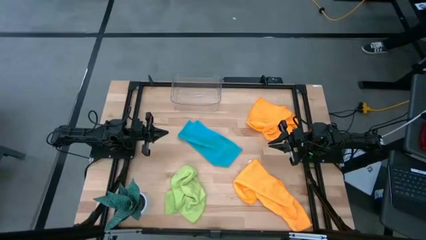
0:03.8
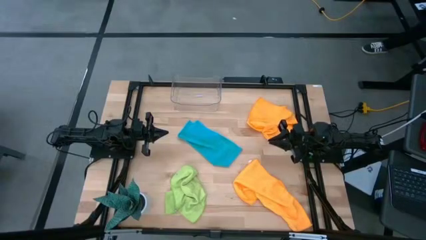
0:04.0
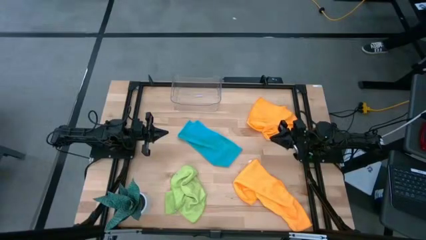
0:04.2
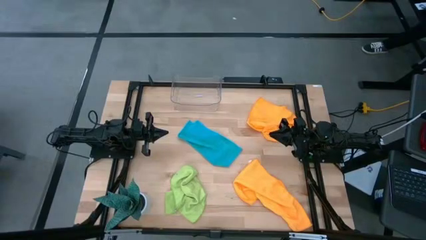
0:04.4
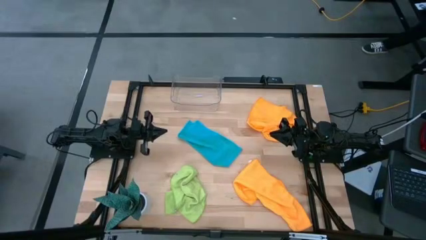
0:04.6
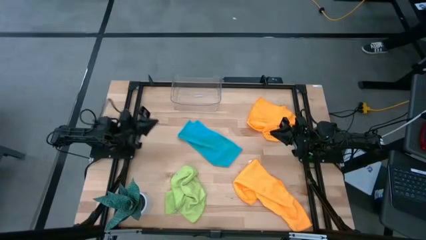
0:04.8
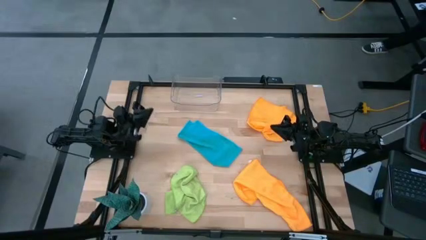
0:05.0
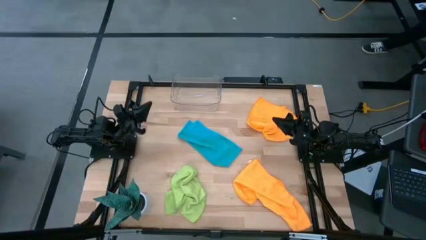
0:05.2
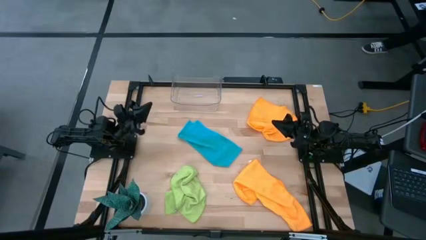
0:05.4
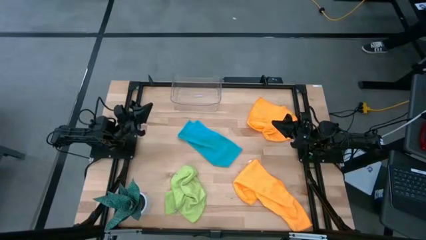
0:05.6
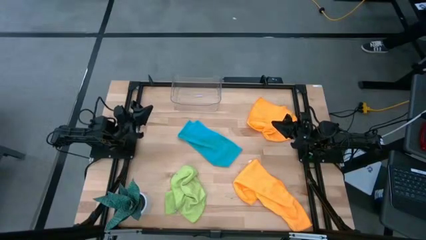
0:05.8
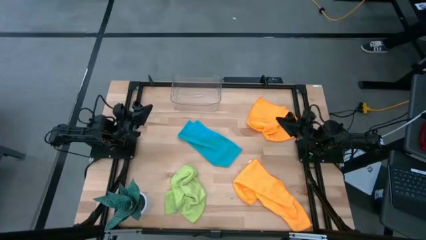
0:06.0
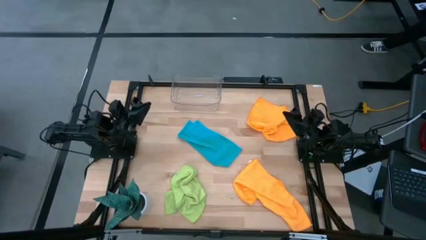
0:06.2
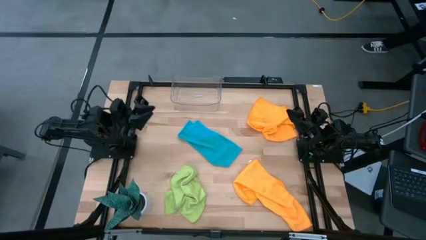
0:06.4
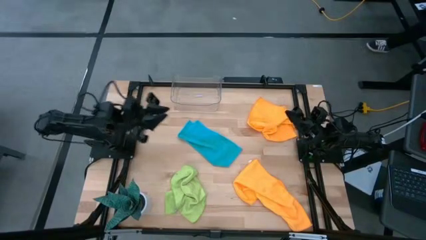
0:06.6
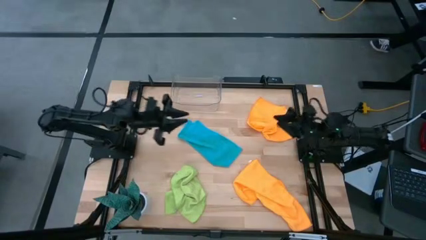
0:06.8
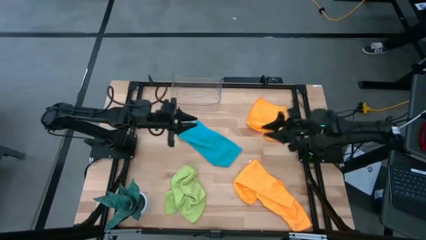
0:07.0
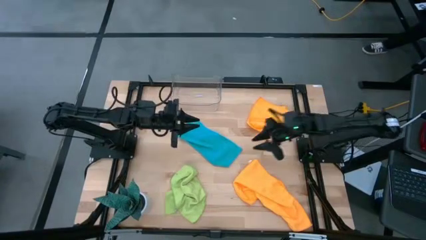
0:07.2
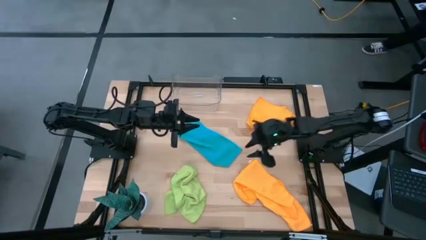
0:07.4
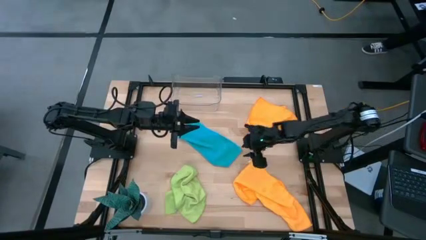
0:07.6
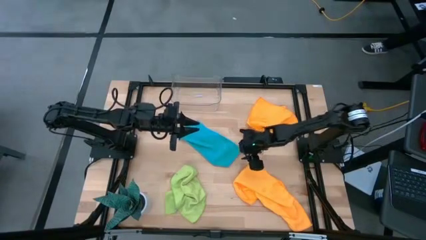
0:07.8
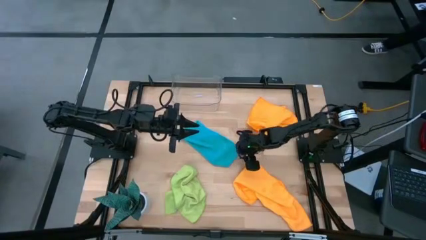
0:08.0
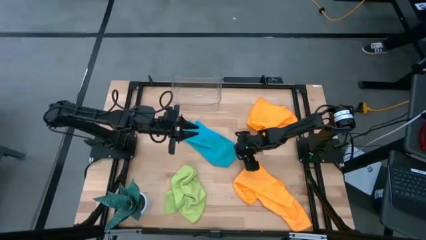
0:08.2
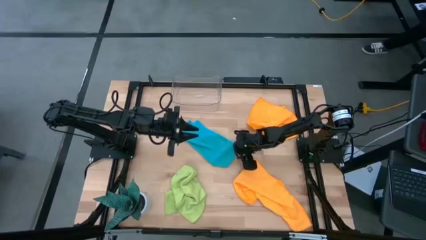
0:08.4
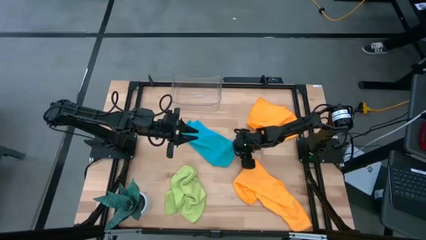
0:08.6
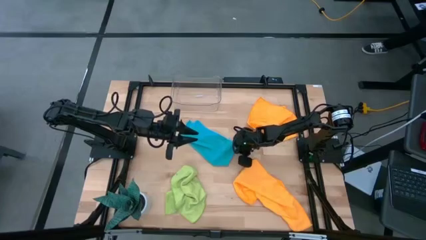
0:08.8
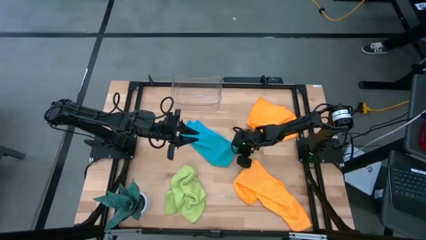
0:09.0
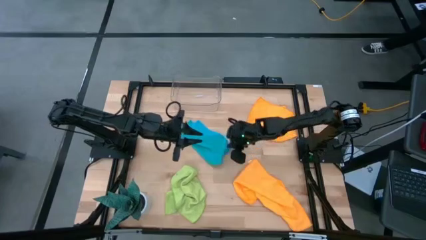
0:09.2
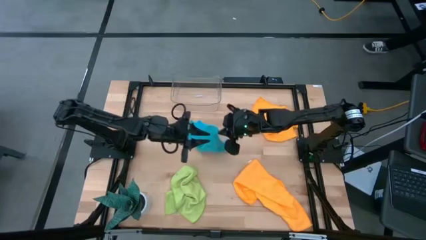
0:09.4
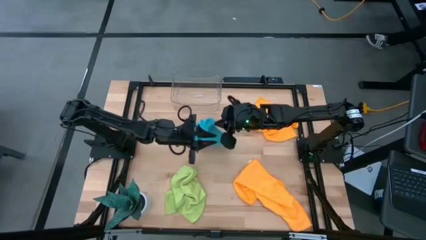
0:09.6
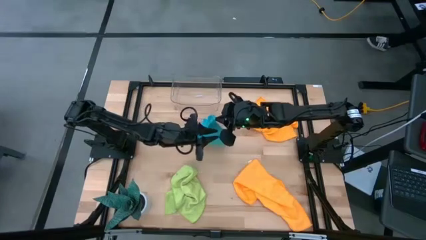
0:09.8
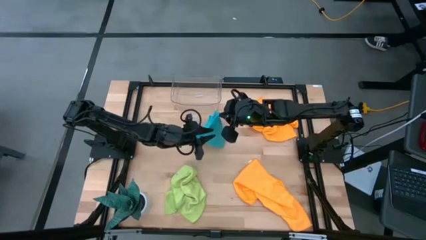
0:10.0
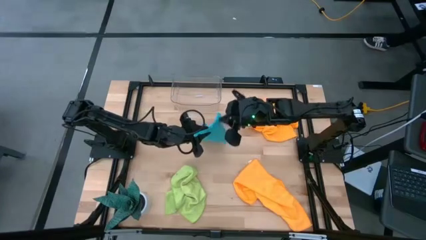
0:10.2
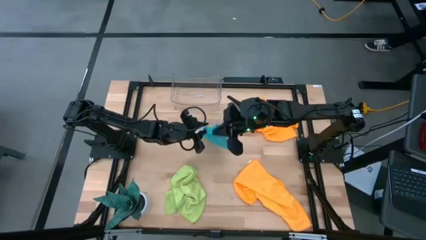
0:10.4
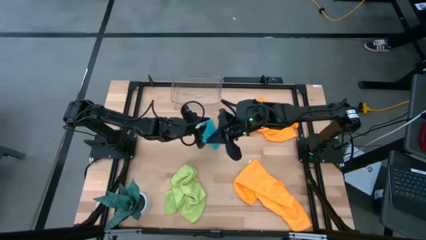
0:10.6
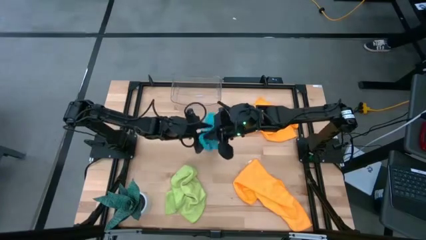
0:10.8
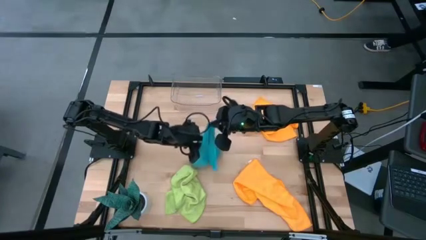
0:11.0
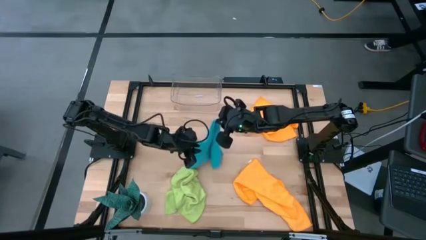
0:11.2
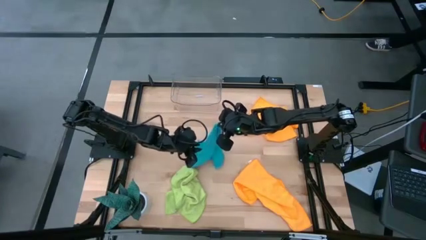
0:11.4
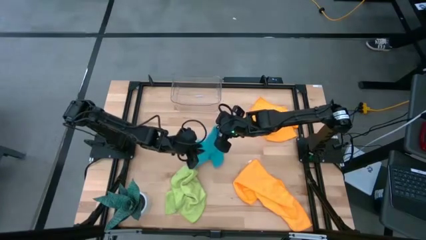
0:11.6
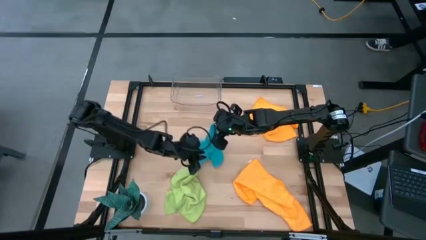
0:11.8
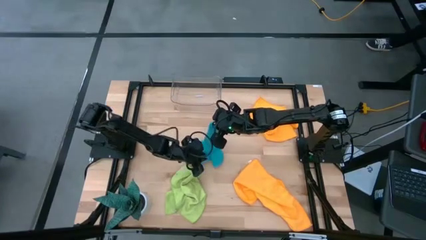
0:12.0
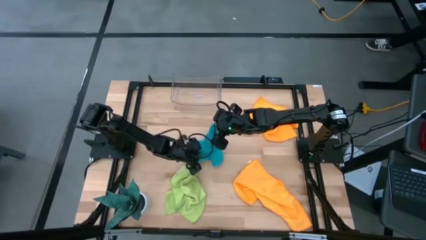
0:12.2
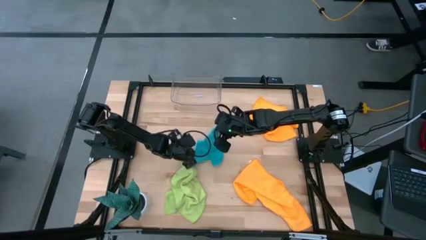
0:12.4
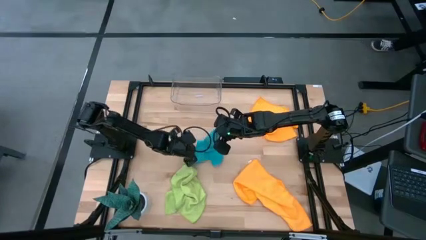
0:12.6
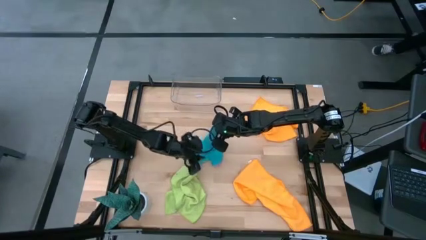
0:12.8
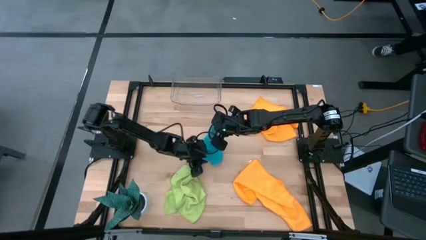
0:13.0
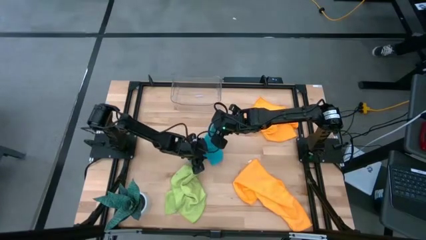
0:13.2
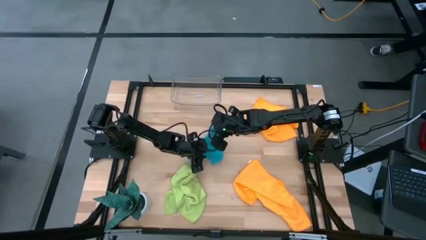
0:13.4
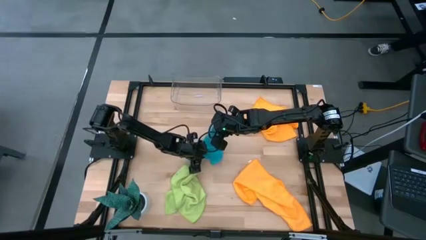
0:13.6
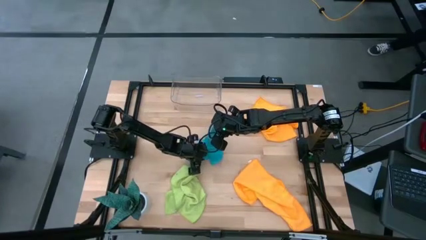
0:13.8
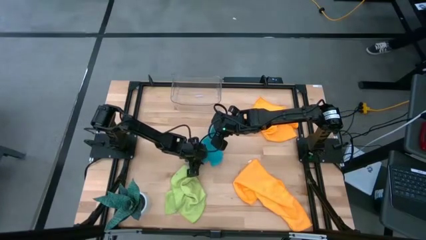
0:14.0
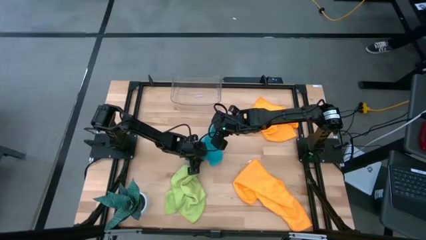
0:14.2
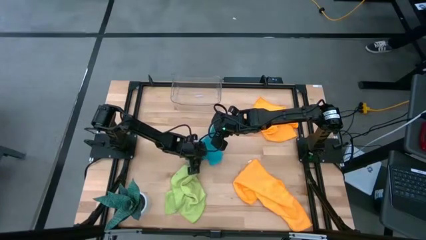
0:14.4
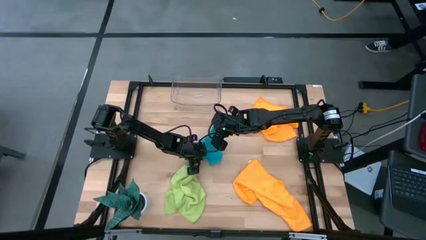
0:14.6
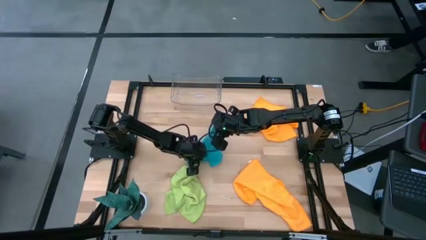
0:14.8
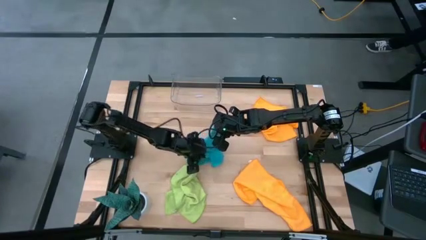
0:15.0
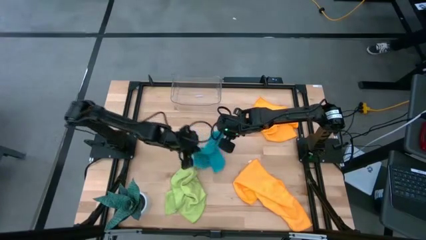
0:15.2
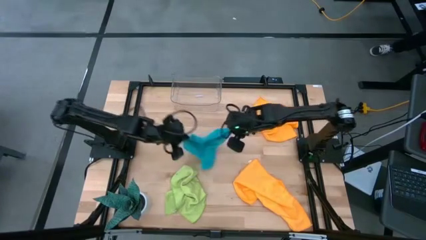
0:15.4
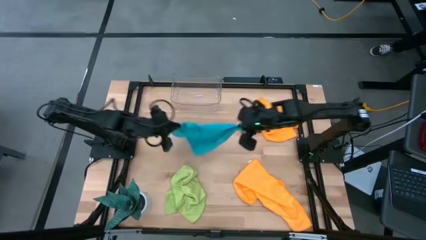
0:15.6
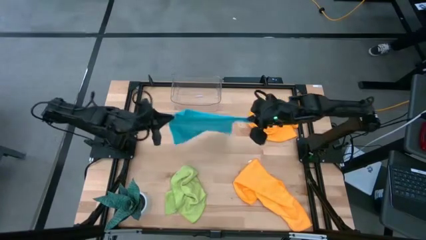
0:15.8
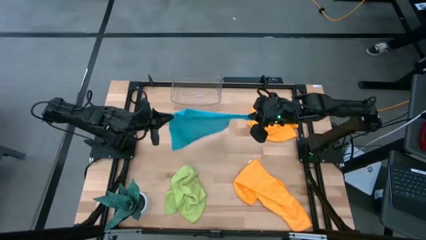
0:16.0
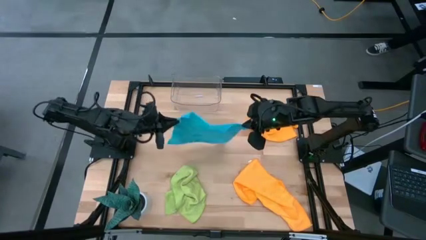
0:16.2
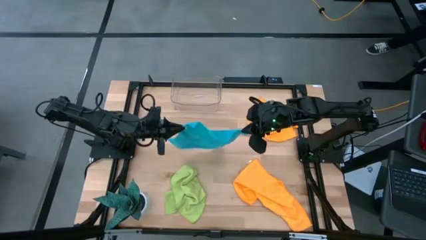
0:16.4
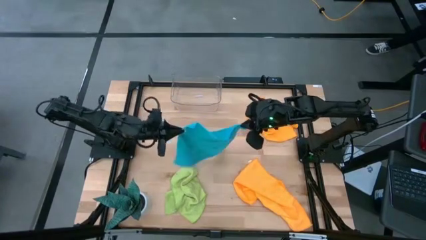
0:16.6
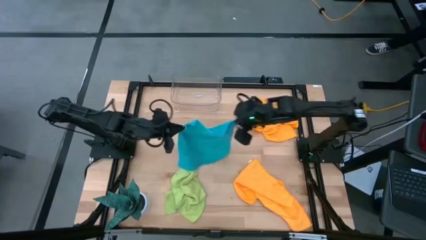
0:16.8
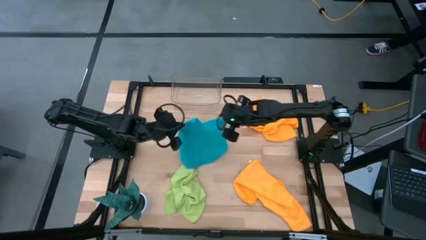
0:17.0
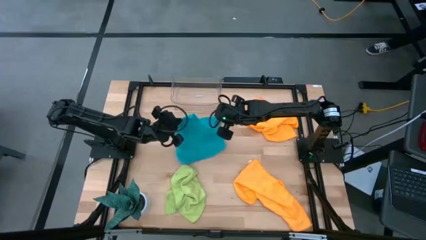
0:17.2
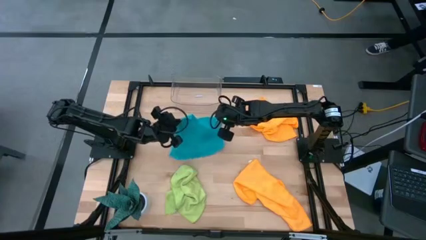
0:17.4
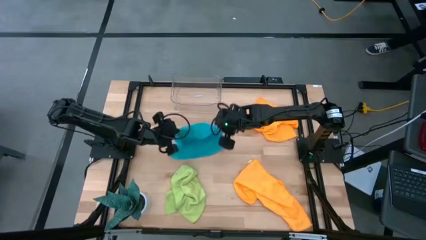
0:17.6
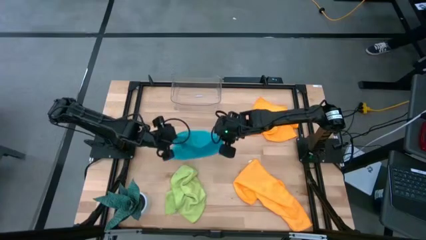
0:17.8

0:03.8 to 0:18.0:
Task: Fold microfiber towels
Fold the blue microfiber cloth
